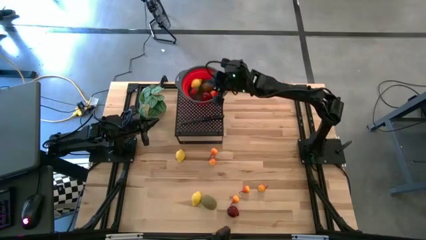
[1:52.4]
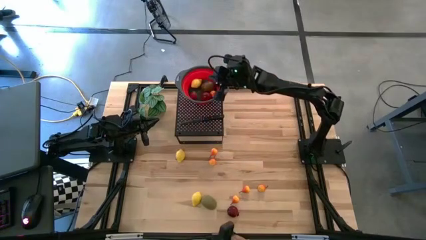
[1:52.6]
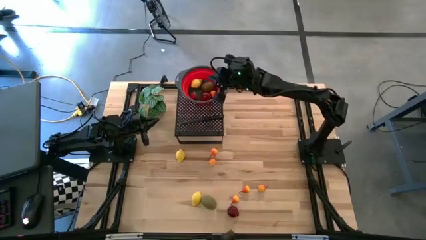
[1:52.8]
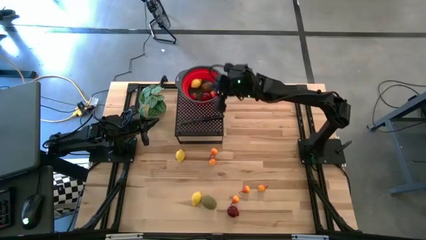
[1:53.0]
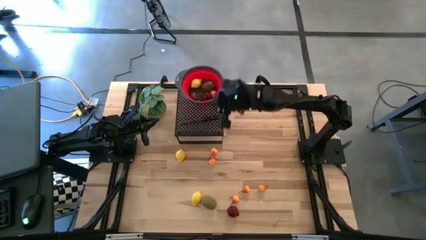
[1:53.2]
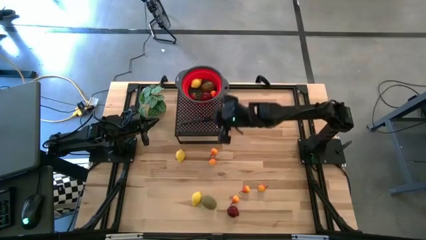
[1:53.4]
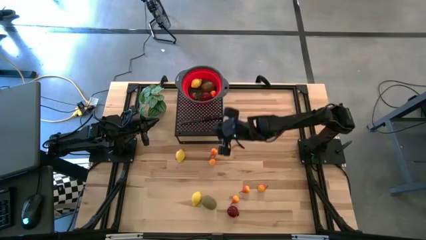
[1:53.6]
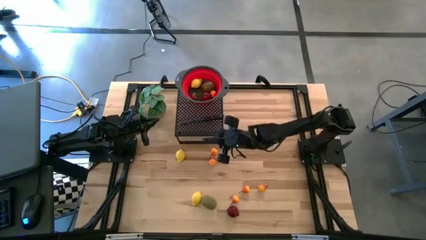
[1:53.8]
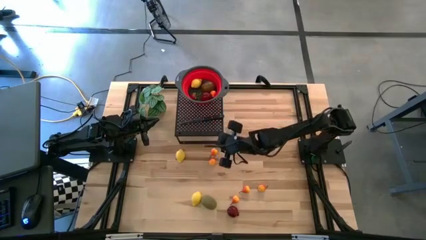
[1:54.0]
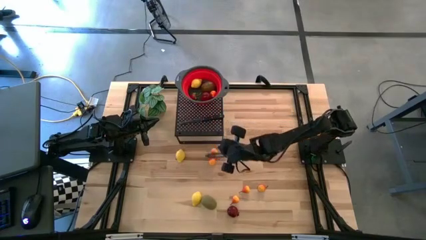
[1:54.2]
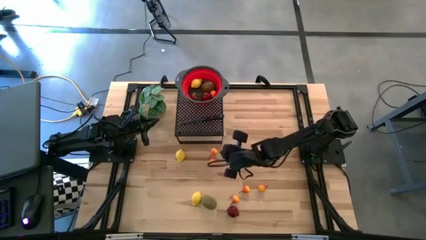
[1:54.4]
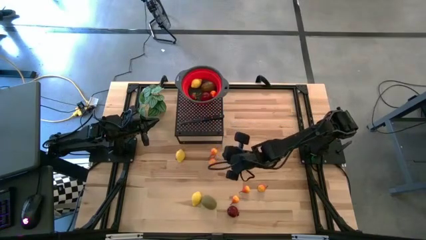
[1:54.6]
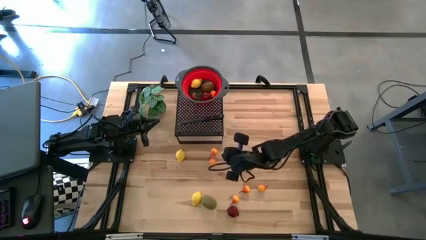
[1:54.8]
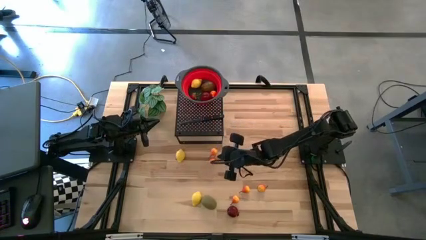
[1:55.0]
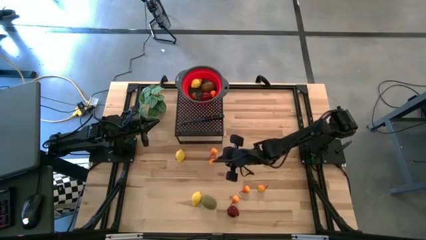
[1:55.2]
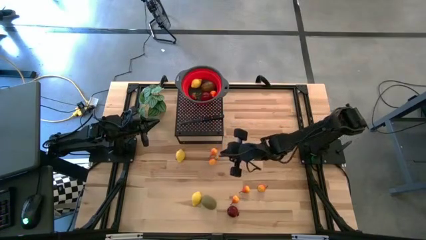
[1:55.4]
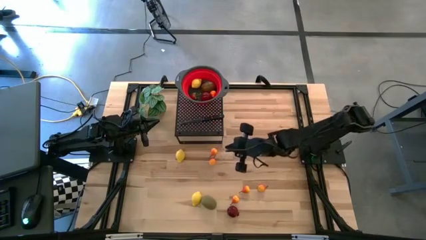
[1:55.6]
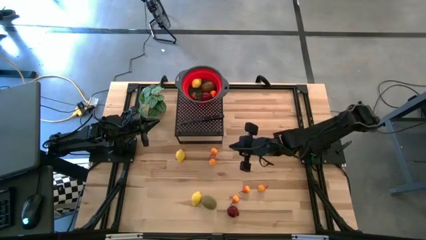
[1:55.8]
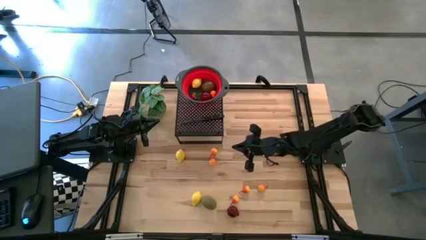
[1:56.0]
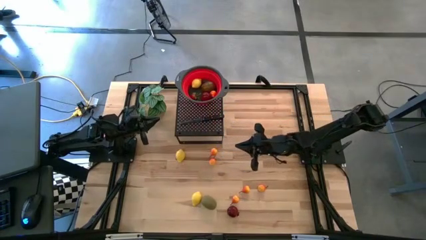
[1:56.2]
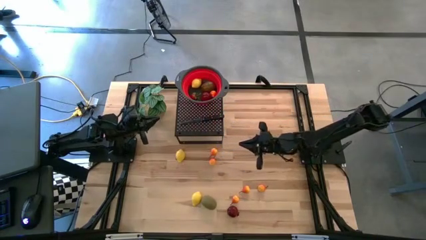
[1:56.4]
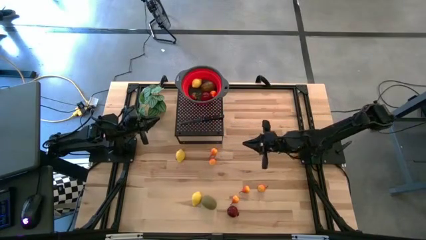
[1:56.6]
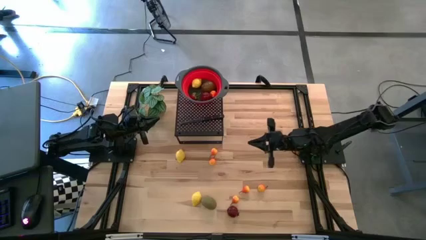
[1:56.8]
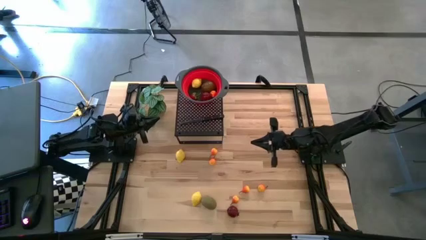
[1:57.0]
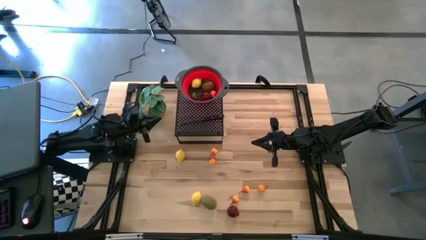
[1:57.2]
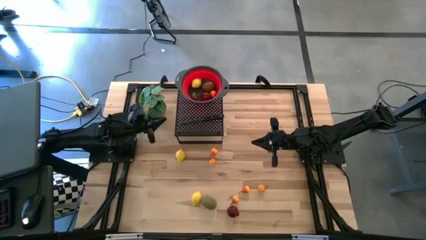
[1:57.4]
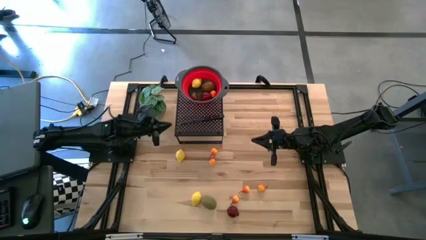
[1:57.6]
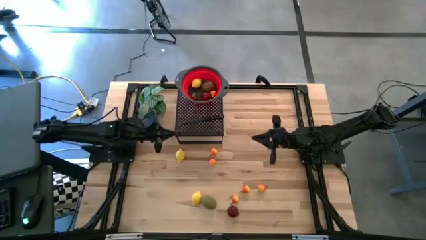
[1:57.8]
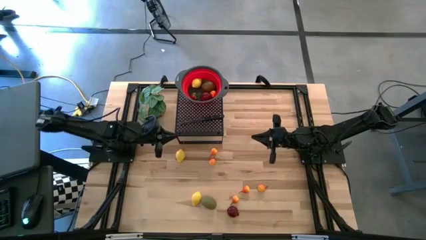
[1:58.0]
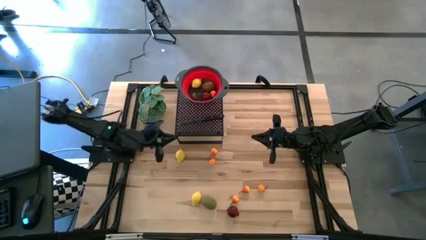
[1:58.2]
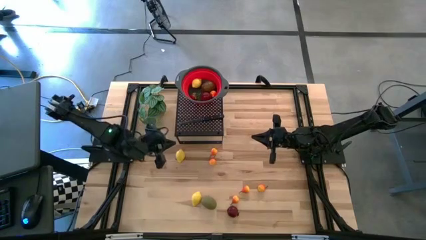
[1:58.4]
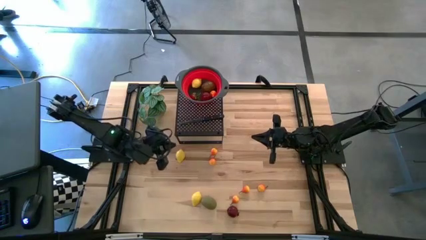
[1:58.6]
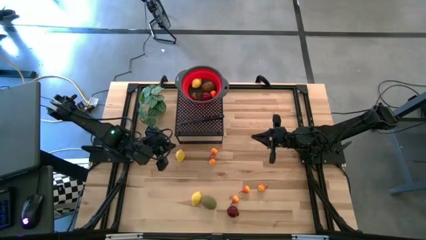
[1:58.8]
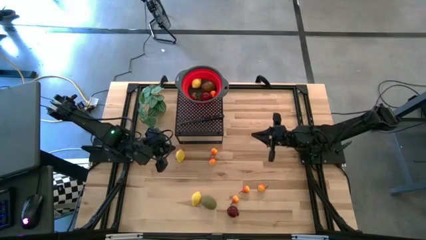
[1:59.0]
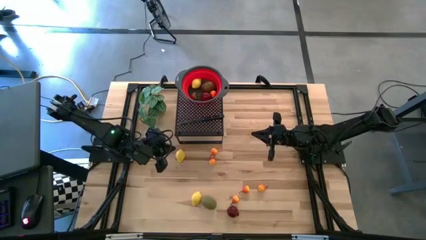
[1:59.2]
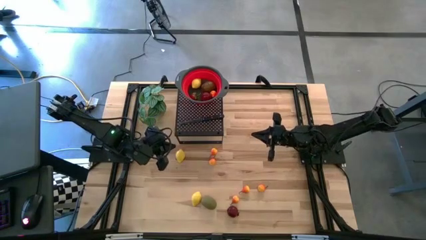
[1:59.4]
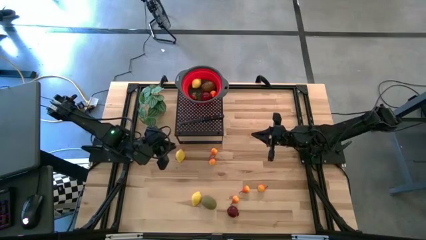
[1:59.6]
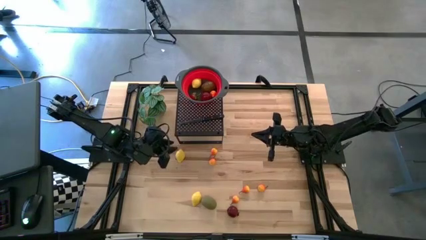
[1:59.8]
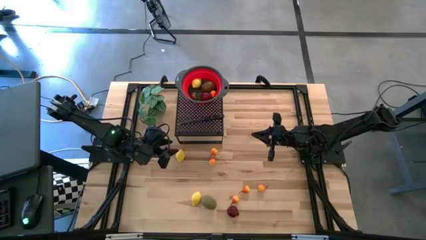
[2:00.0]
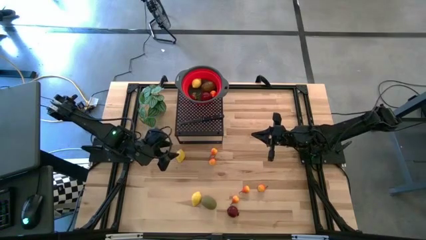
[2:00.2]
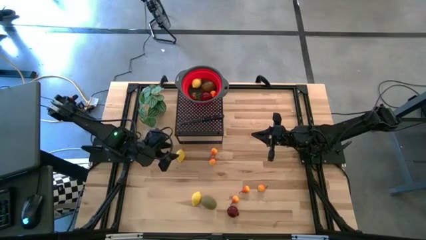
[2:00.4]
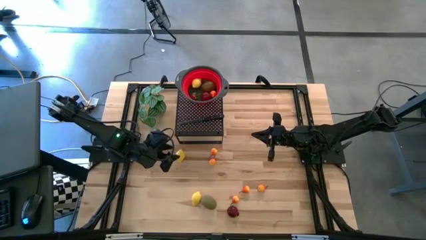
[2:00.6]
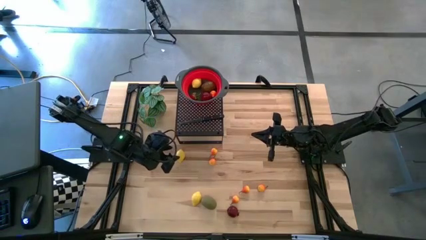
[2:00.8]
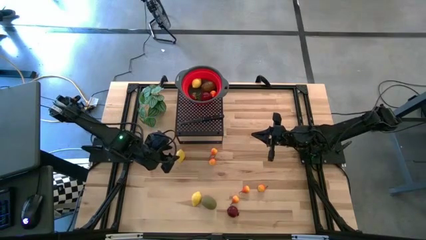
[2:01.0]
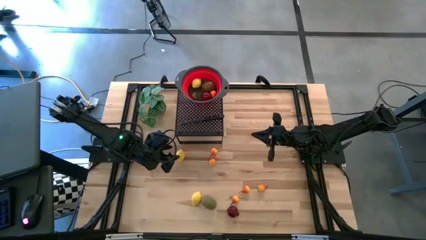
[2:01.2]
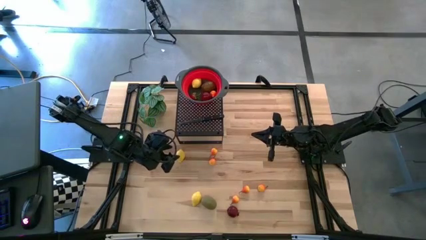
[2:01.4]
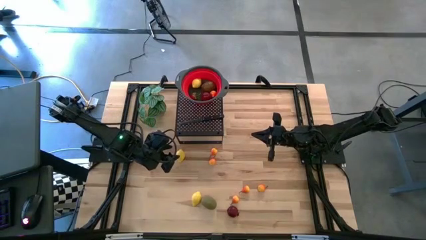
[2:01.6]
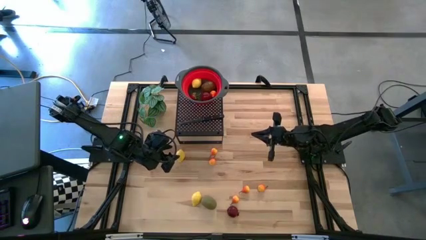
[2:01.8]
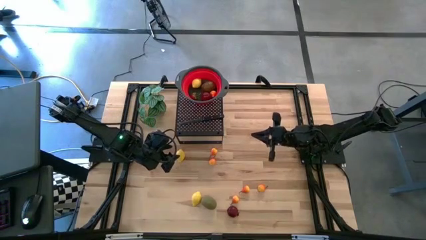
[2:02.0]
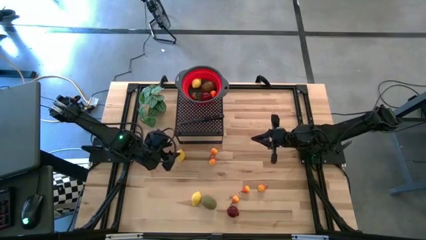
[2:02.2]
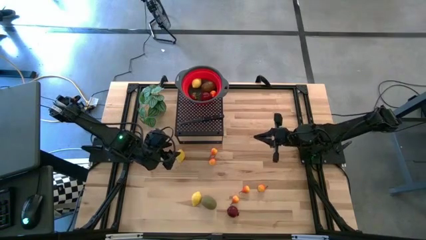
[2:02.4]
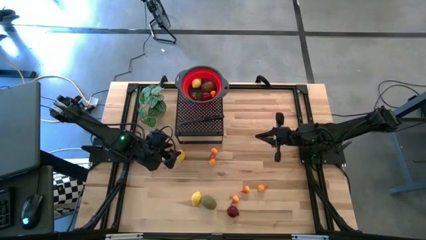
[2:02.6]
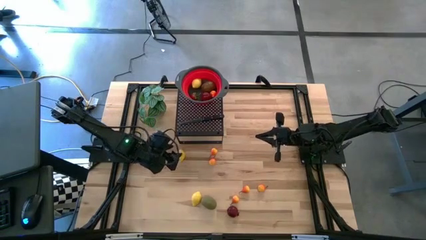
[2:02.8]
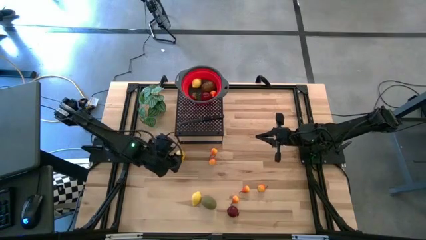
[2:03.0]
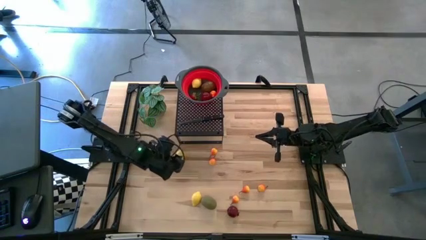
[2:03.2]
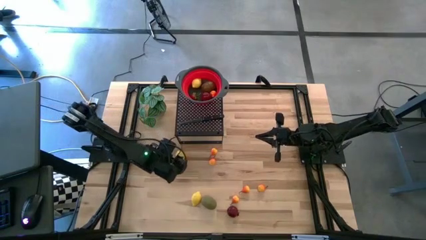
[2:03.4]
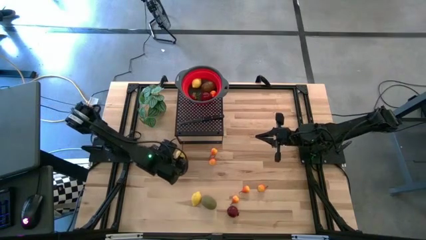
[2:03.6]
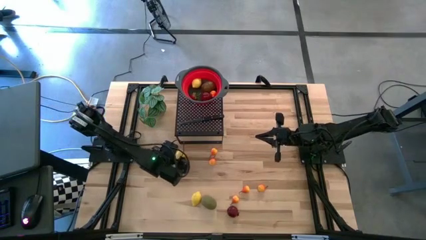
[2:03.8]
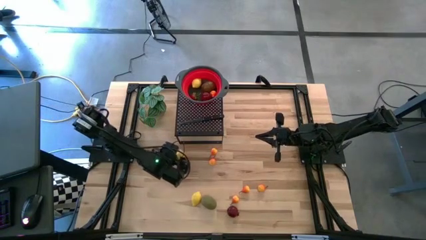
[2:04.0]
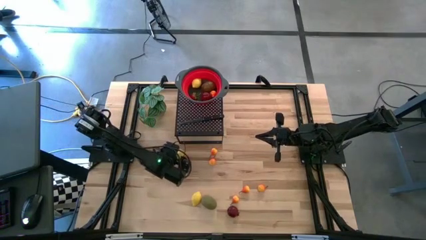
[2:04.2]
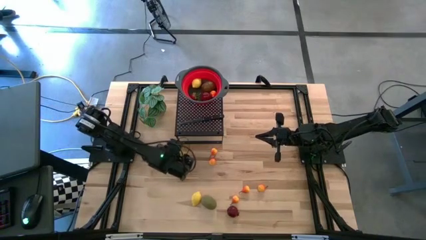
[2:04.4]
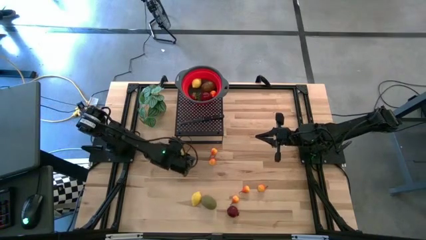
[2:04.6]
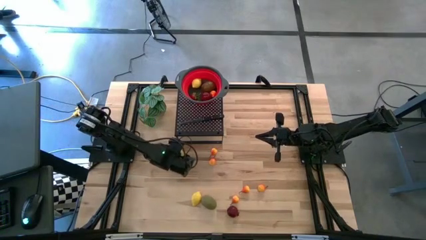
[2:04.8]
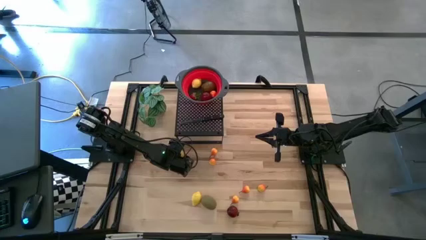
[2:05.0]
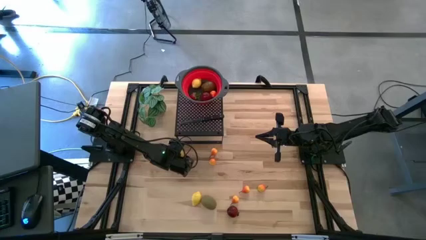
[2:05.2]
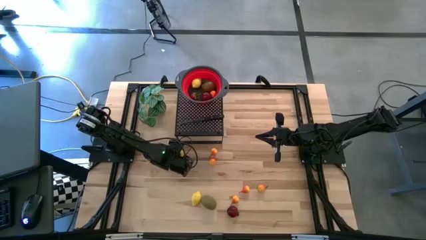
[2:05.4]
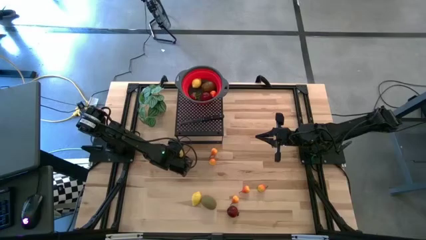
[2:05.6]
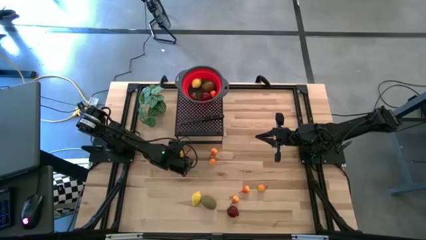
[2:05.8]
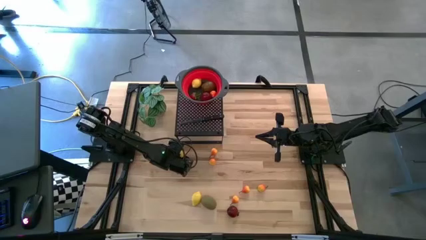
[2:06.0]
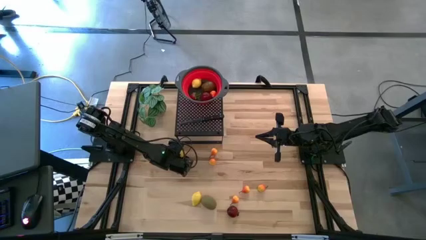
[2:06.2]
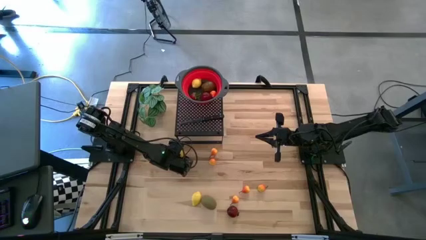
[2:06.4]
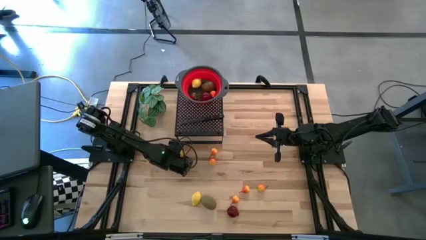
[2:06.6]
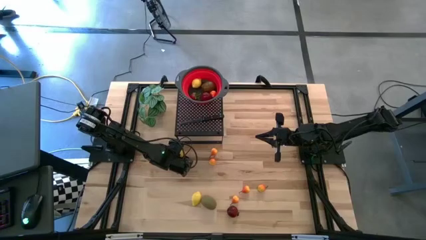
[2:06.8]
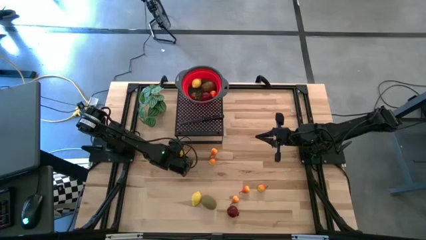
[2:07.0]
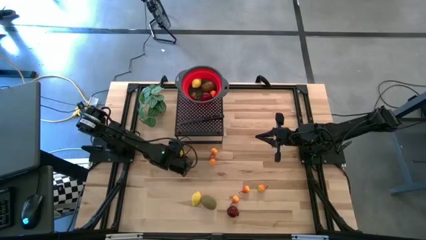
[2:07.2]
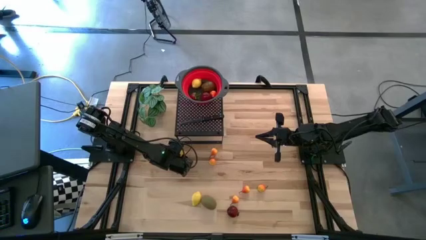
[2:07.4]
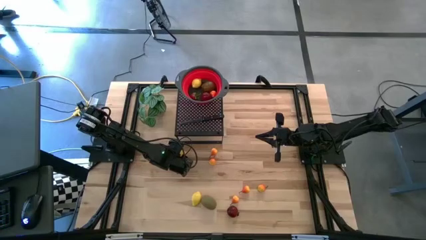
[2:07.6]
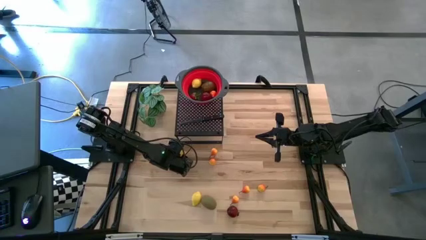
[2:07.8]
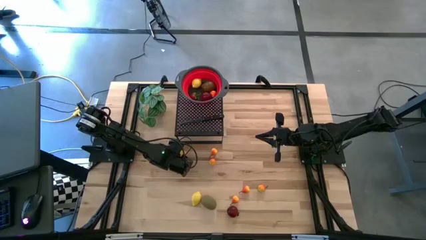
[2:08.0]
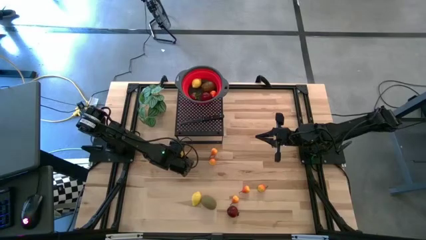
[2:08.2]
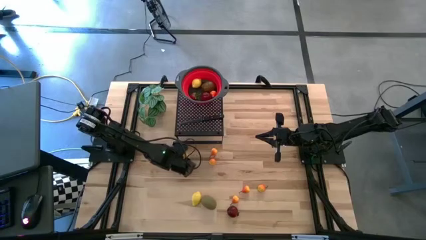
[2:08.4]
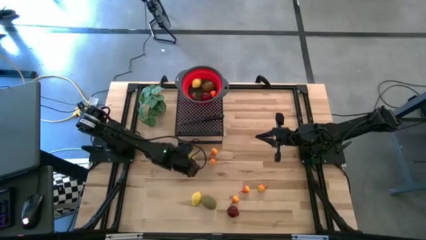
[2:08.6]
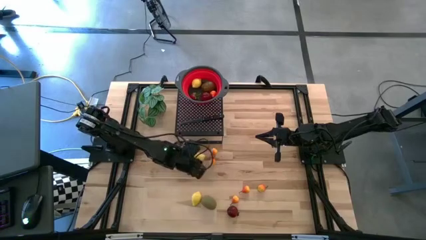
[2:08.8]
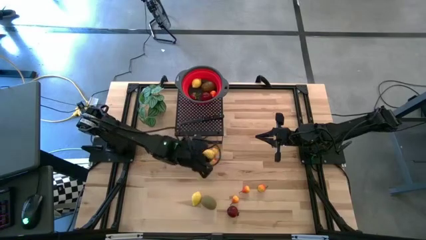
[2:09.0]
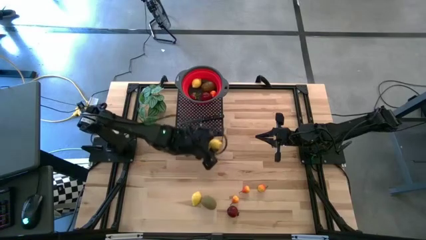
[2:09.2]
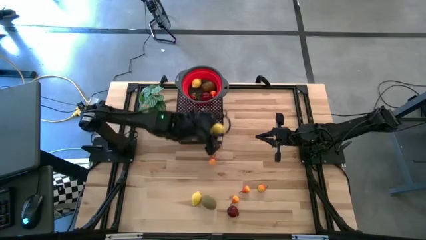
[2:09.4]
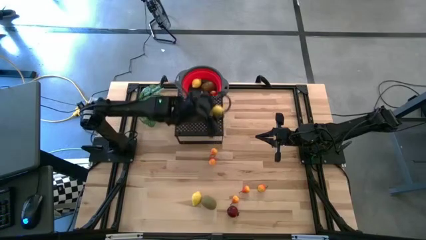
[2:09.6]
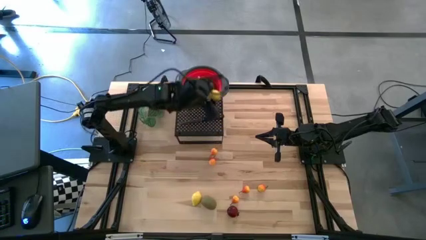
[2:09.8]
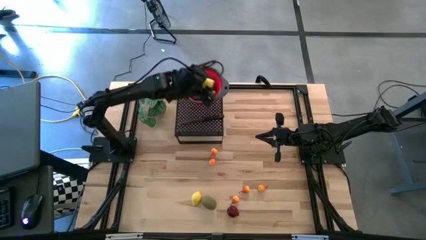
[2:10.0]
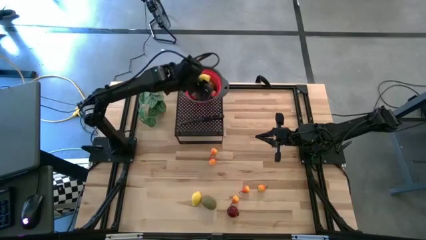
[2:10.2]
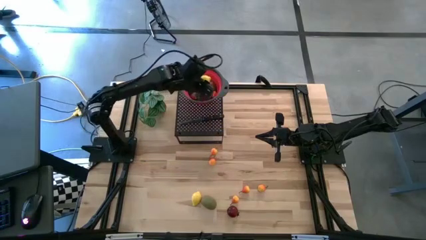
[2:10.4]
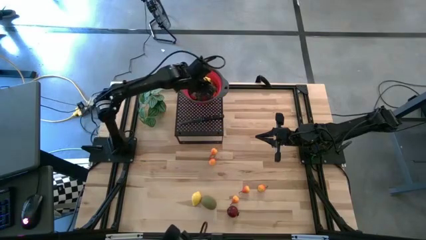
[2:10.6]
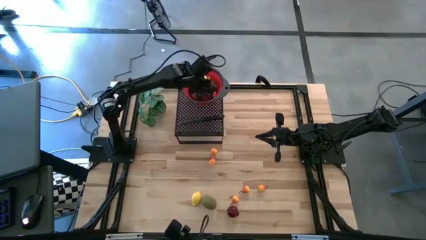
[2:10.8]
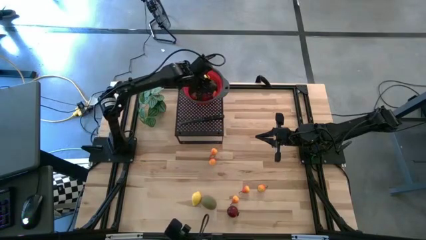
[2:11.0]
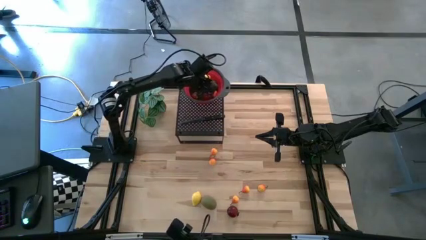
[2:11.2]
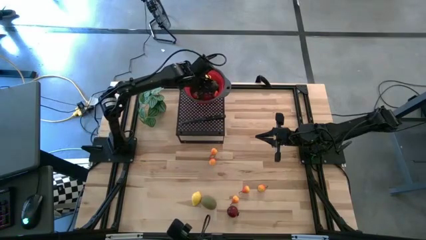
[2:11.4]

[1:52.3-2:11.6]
Task: Pick & Place Fruit
Put the top lemon into the red strainer bowl
